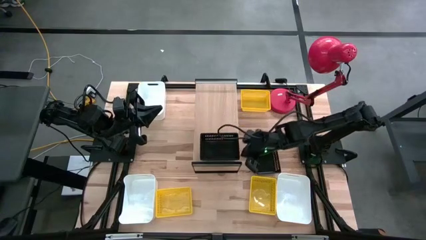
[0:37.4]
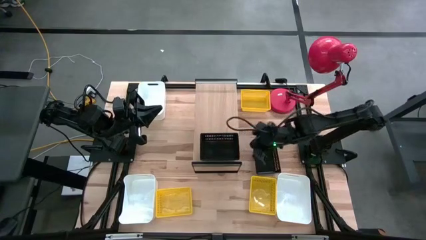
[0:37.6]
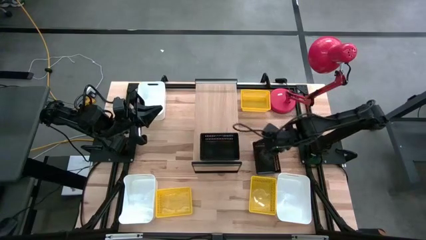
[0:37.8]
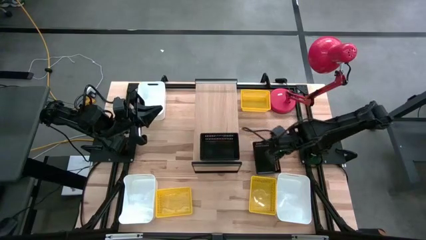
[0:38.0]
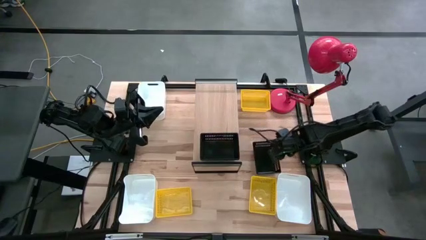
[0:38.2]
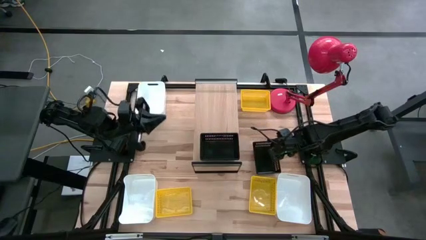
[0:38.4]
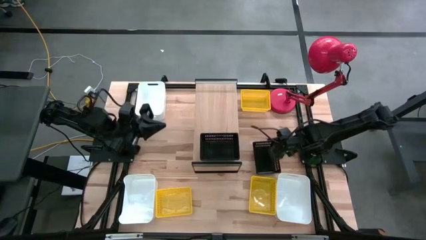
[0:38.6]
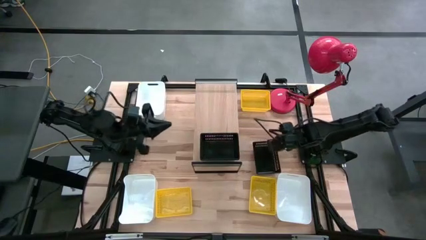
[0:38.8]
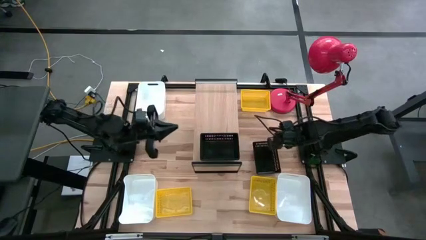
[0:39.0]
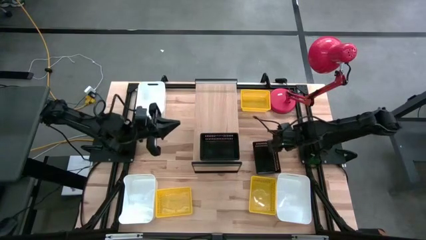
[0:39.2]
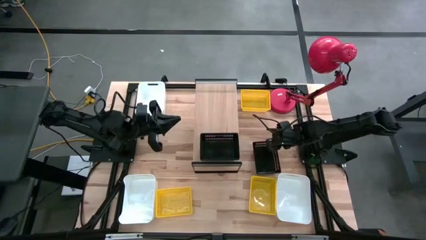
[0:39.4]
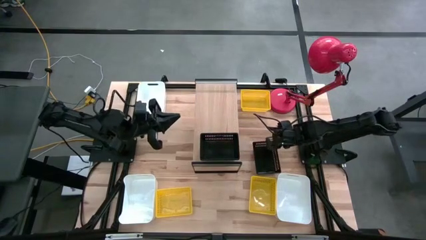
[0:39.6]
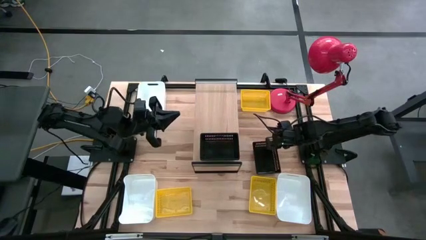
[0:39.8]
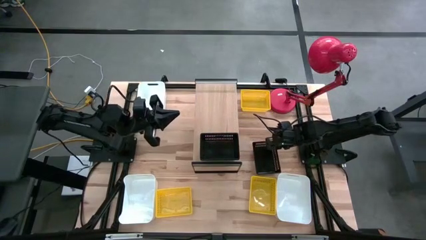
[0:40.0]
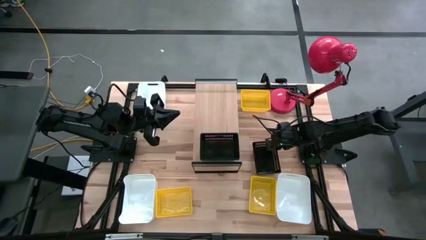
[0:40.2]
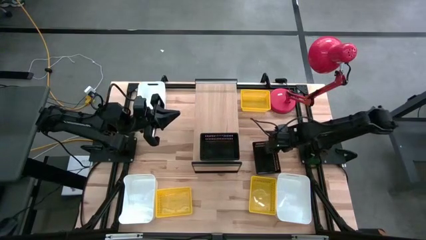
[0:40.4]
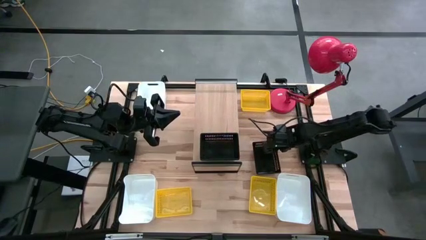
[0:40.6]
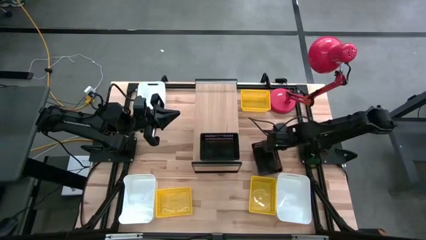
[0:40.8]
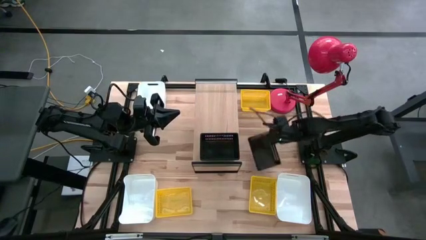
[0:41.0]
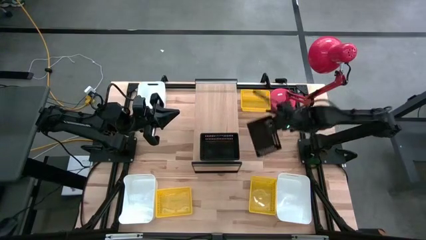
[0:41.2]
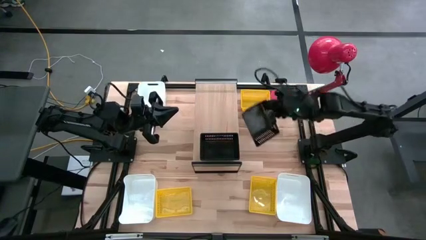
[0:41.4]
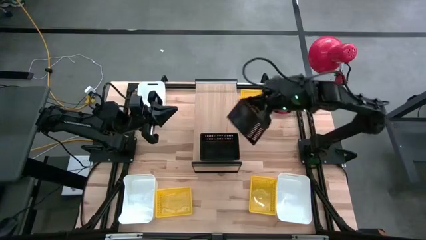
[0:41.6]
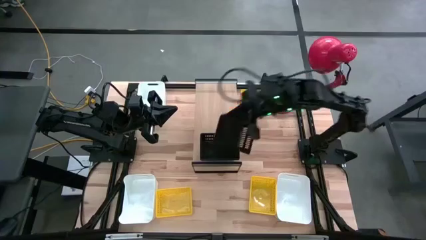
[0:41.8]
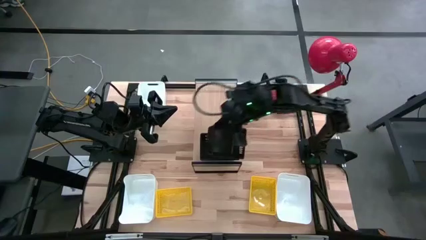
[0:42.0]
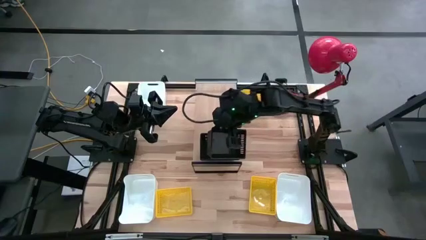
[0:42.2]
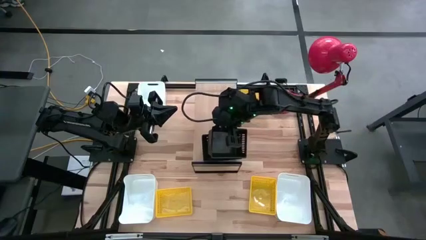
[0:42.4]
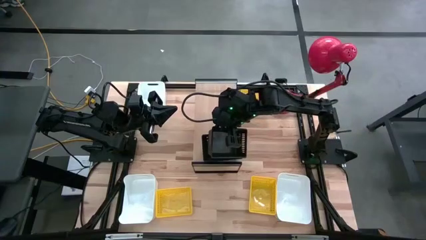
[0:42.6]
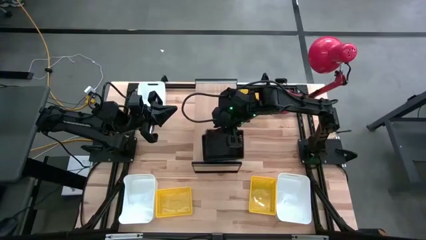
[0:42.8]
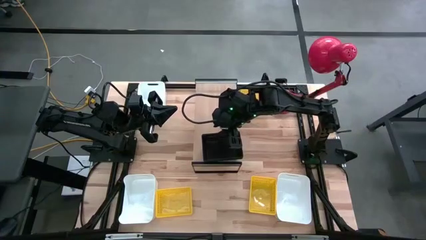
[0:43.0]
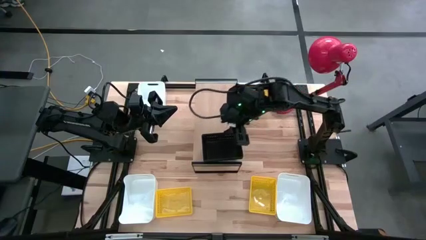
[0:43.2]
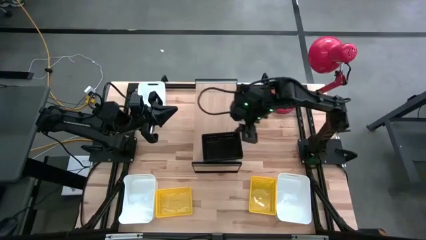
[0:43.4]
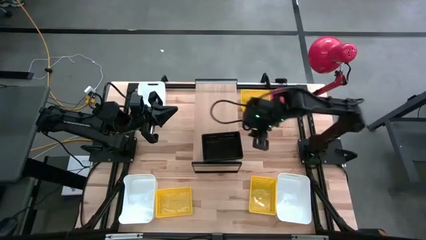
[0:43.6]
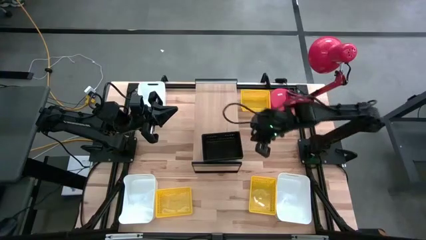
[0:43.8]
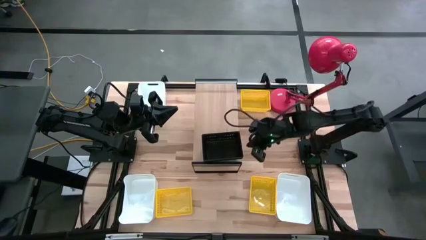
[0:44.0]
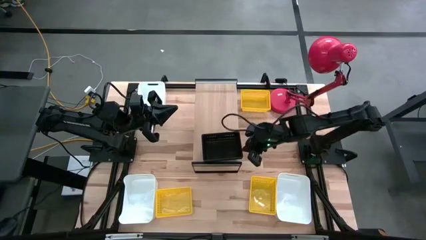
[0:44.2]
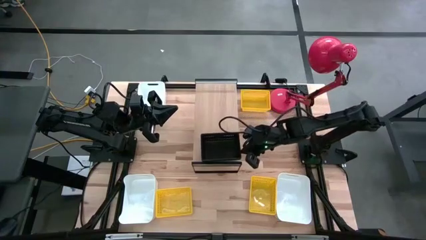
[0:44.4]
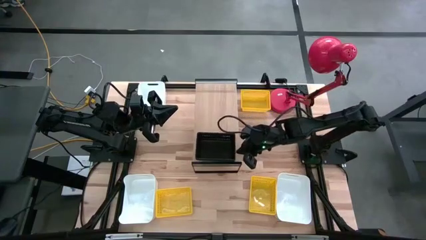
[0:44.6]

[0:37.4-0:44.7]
Task: Stack baskets on shelf by color
Stack the black bin on top of the black bins on the shelf

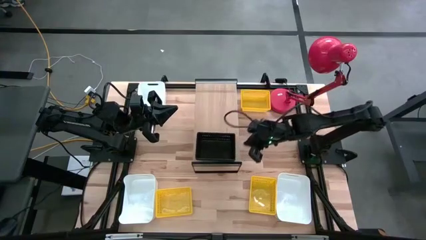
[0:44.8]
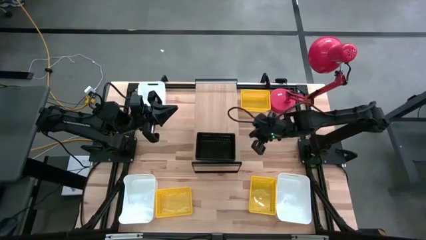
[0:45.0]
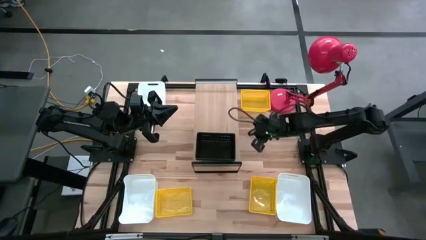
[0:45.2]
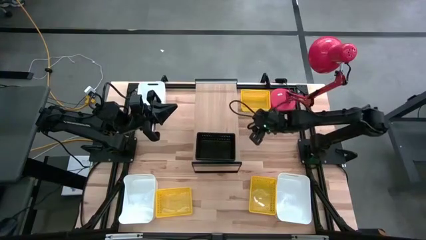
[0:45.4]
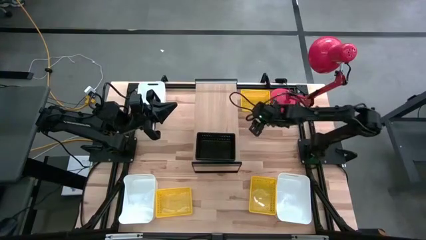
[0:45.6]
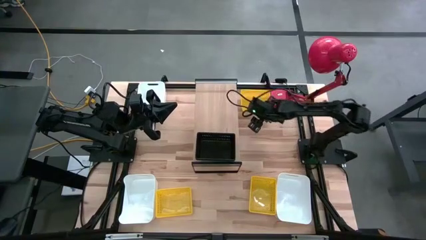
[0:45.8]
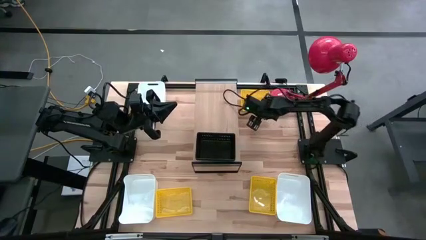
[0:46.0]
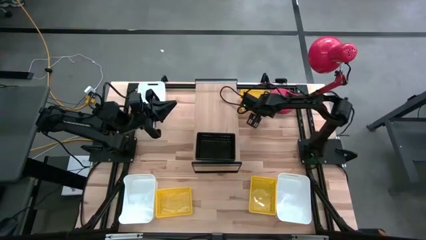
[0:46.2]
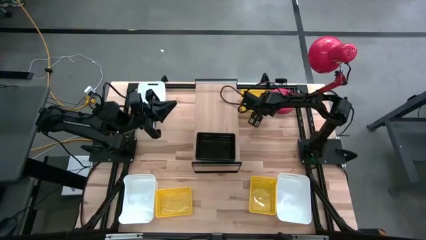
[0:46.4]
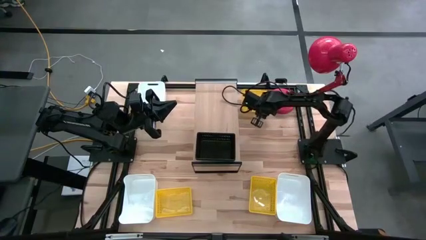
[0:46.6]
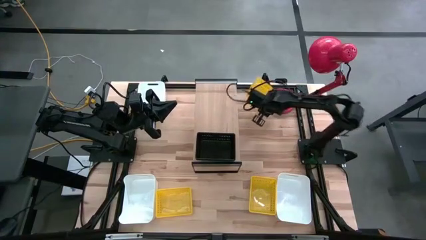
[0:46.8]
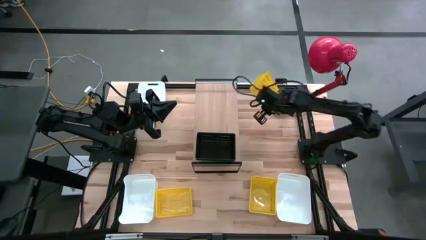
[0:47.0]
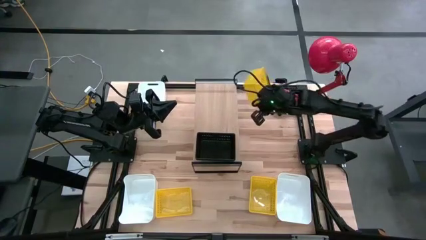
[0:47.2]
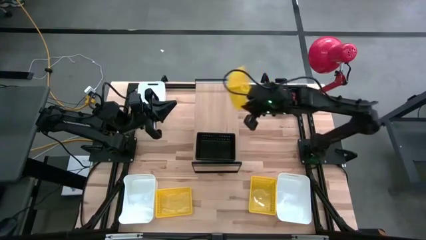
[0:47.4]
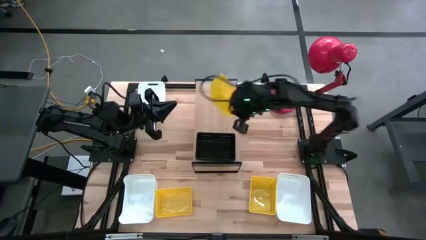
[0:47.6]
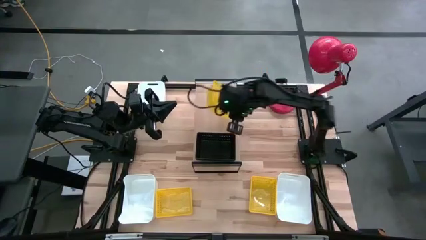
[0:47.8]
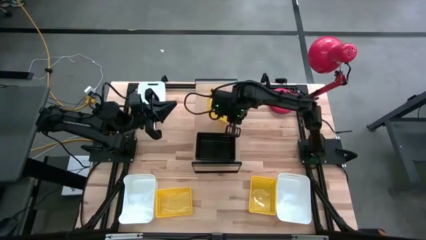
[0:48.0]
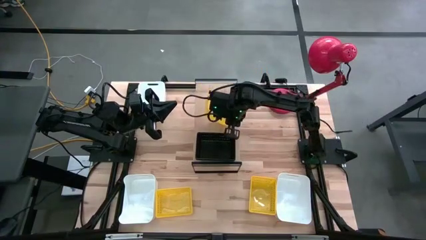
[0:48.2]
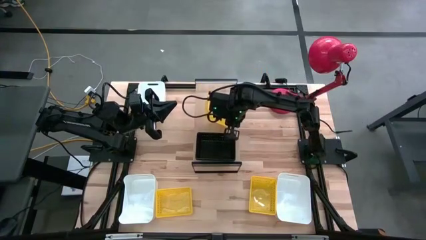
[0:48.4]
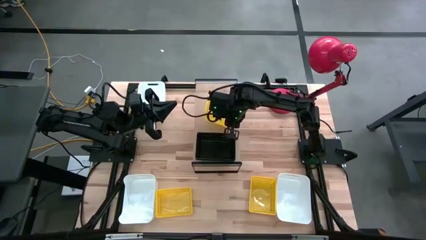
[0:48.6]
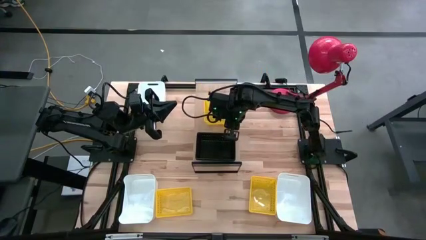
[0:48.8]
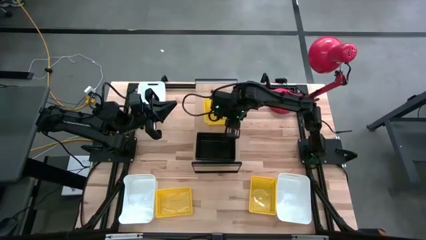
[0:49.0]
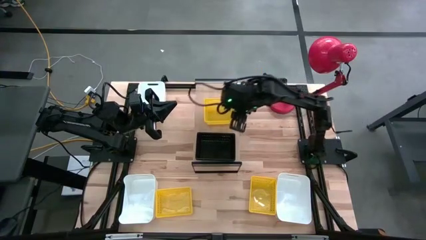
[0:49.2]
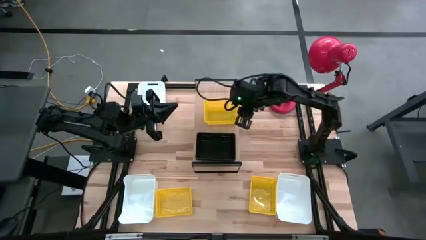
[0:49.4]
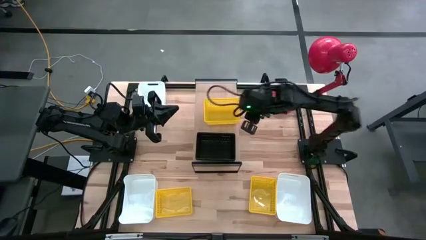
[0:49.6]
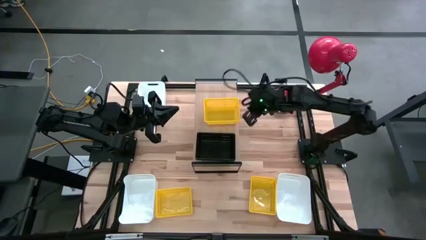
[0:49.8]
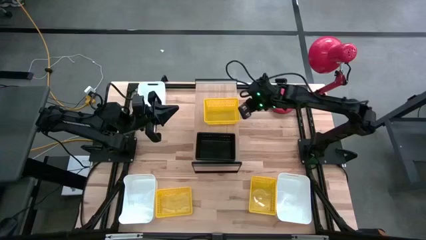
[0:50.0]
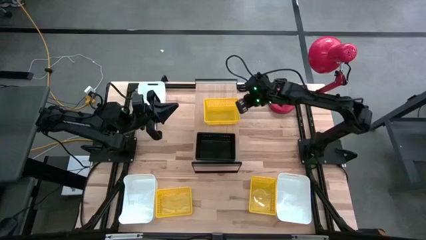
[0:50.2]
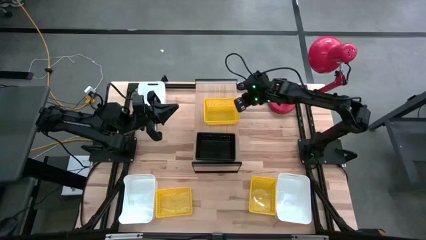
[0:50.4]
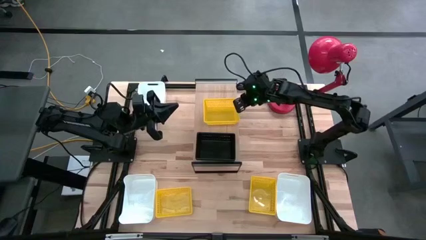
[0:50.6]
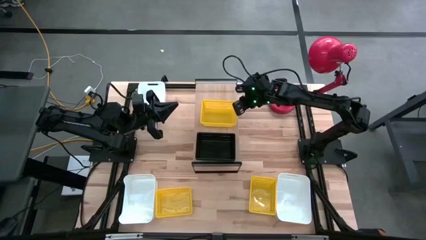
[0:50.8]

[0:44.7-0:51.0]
Put the top yellow bin on the shelf

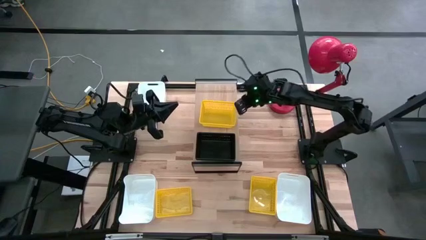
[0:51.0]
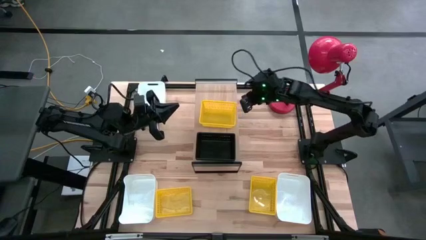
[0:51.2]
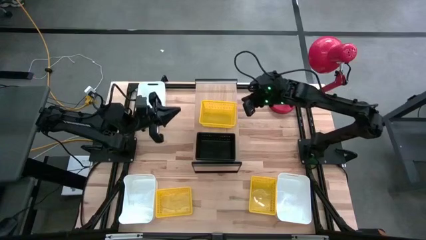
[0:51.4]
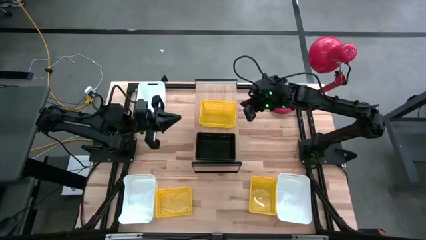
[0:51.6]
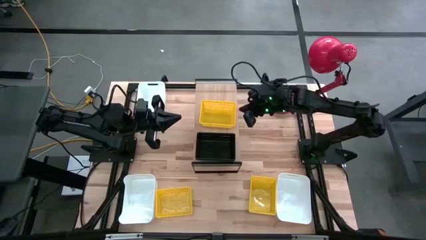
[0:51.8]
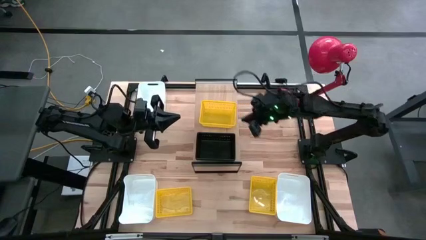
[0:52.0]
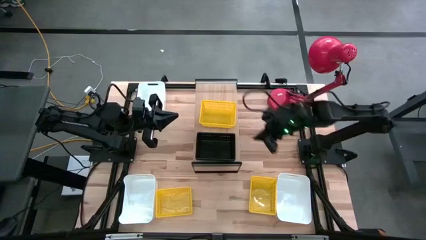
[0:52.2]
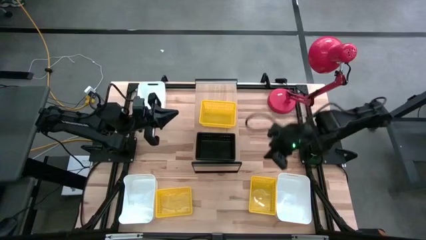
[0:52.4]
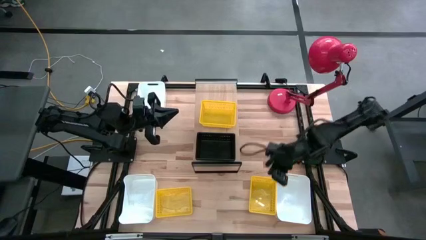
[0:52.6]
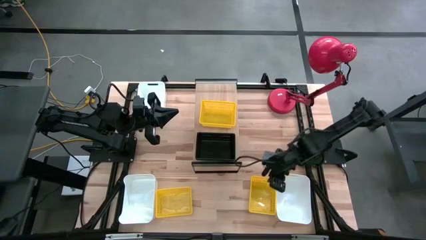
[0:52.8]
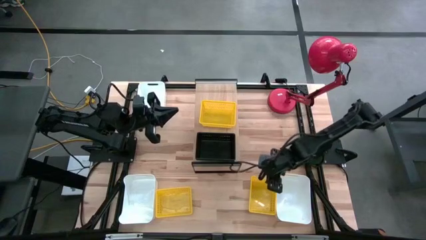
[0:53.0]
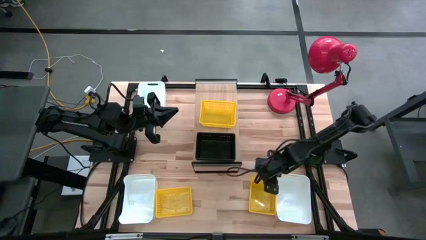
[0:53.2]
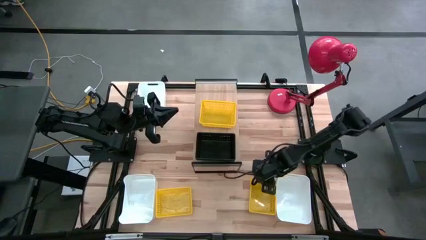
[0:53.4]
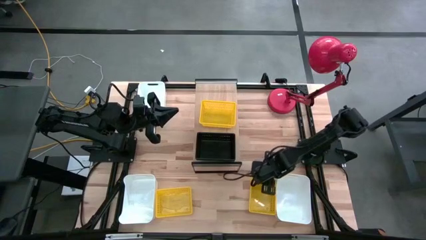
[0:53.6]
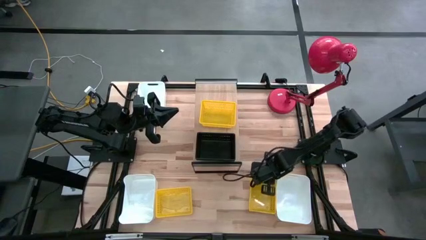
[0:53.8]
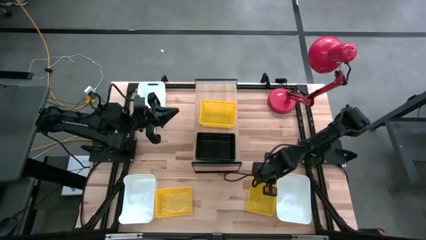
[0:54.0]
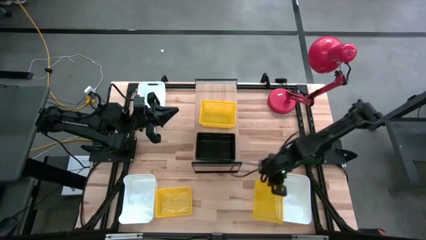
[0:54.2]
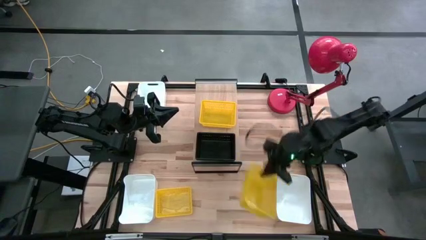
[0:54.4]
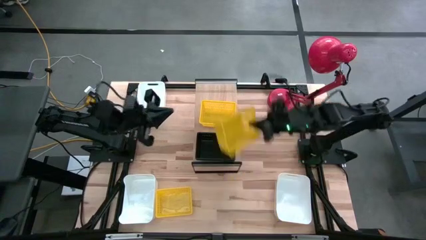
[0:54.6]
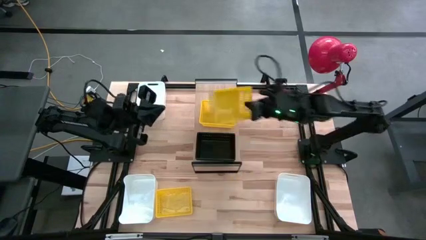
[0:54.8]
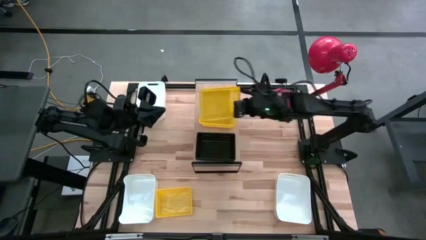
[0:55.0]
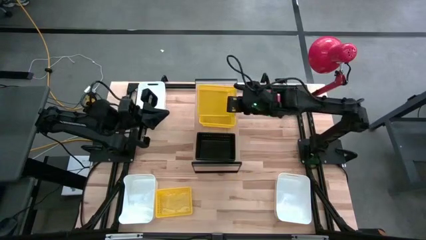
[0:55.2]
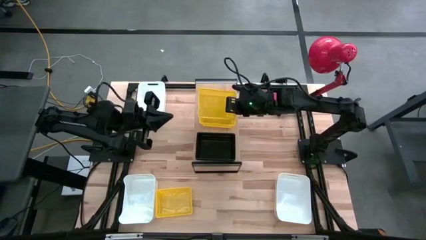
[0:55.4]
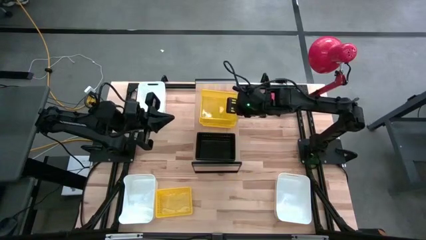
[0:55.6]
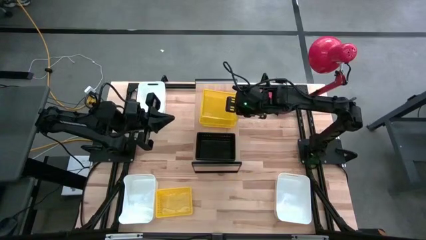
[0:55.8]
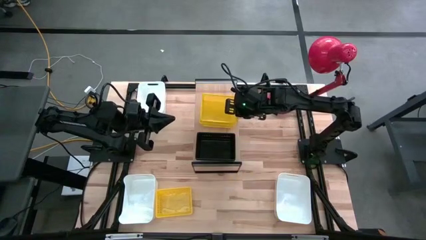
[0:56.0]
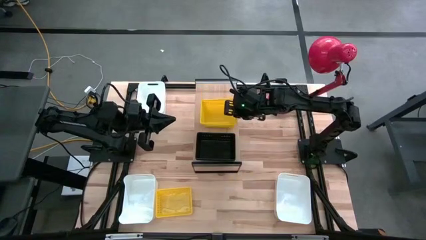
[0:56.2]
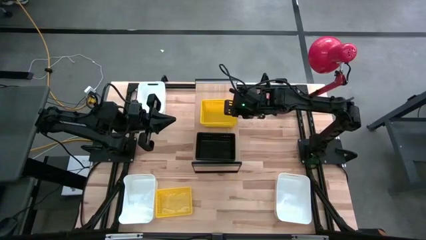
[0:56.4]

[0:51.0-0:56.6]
Stack the right yellow bin on top of the yellow bin on the shelf
